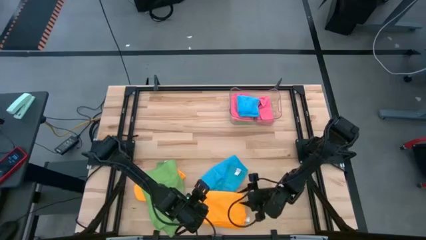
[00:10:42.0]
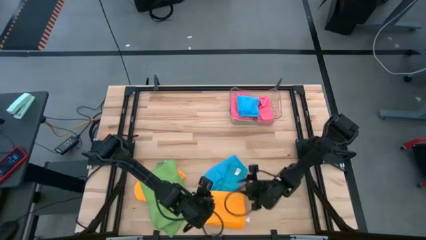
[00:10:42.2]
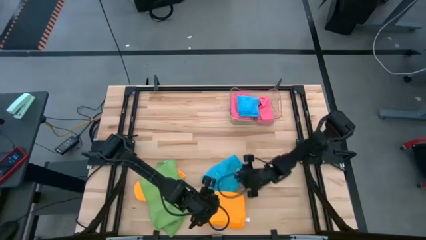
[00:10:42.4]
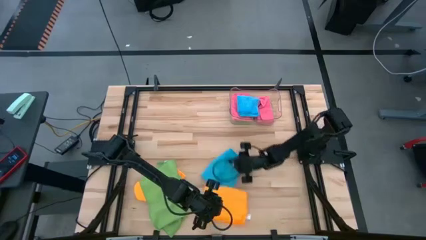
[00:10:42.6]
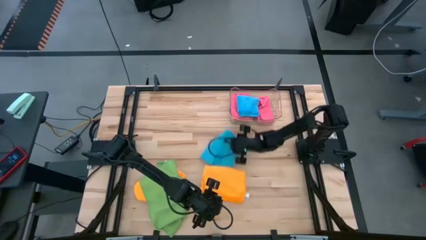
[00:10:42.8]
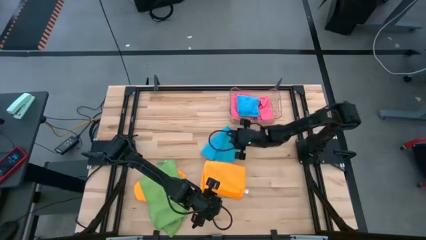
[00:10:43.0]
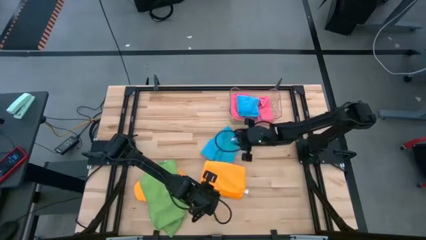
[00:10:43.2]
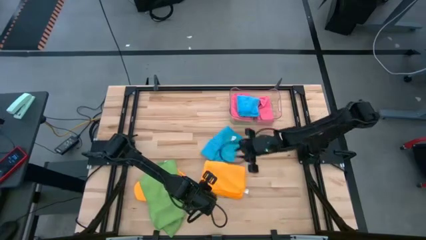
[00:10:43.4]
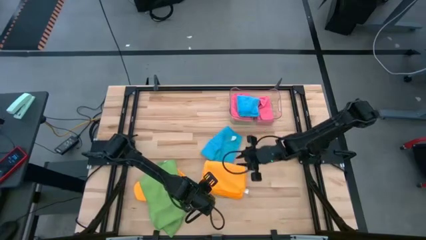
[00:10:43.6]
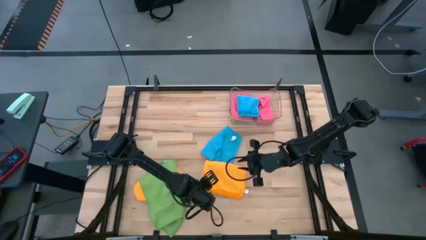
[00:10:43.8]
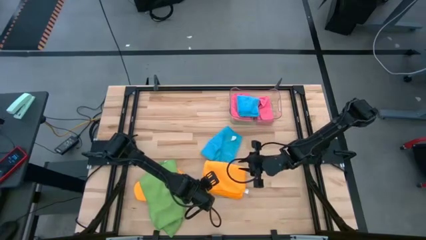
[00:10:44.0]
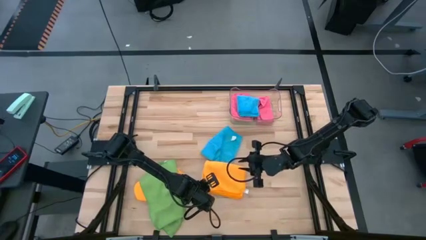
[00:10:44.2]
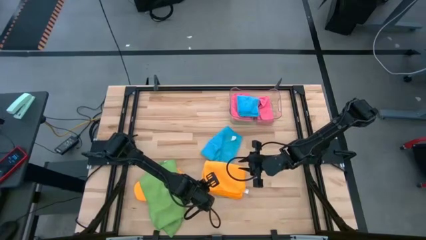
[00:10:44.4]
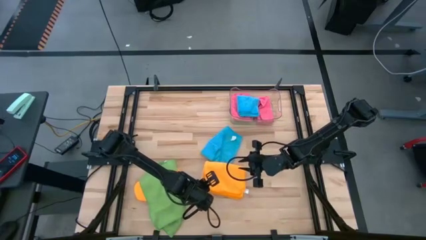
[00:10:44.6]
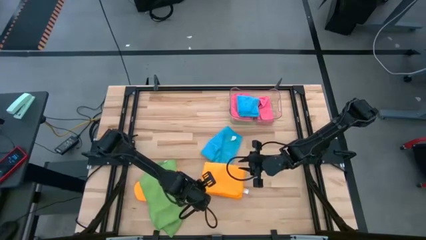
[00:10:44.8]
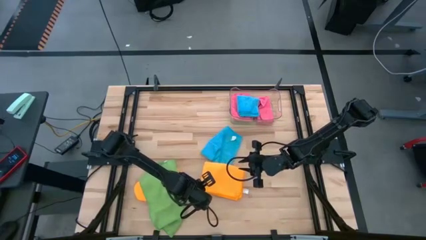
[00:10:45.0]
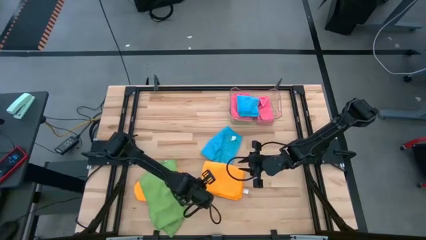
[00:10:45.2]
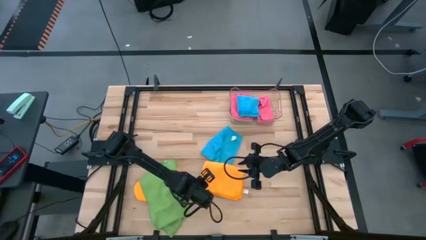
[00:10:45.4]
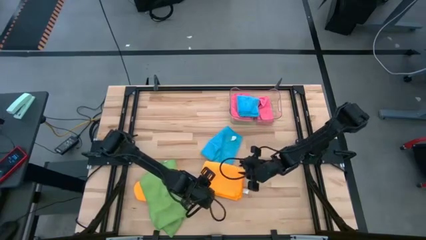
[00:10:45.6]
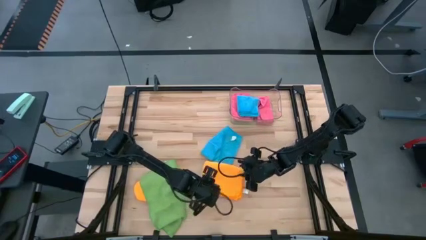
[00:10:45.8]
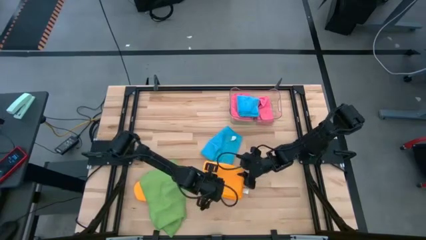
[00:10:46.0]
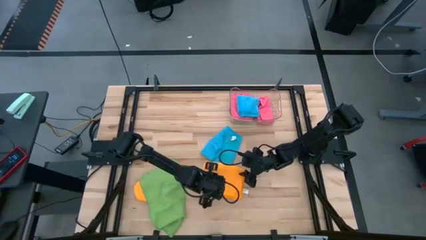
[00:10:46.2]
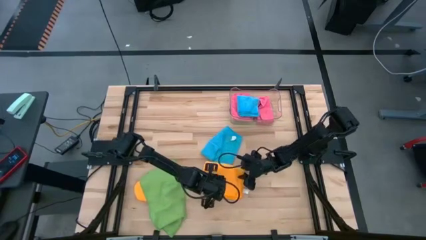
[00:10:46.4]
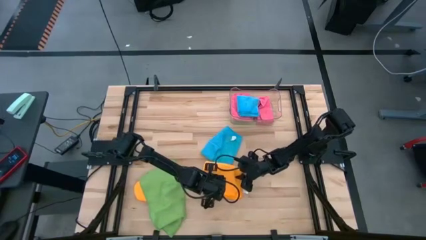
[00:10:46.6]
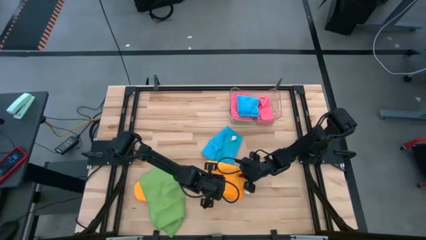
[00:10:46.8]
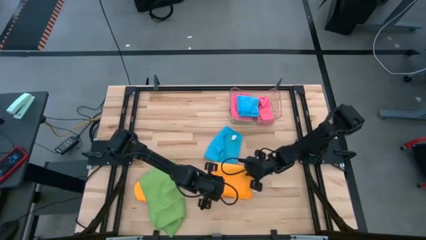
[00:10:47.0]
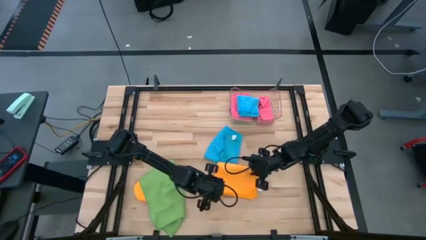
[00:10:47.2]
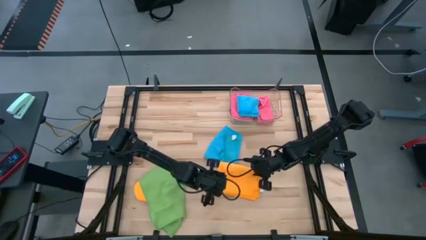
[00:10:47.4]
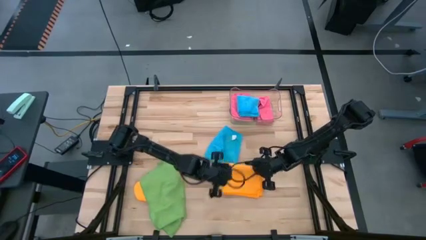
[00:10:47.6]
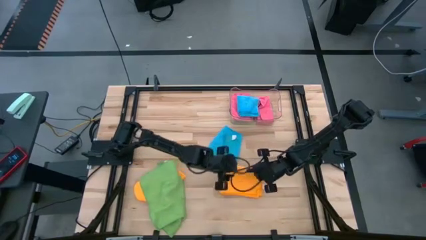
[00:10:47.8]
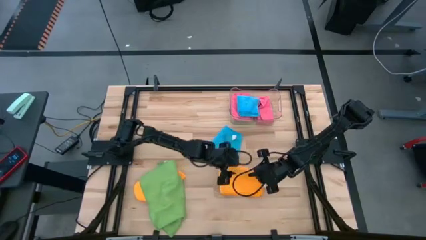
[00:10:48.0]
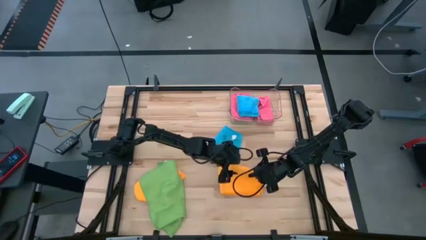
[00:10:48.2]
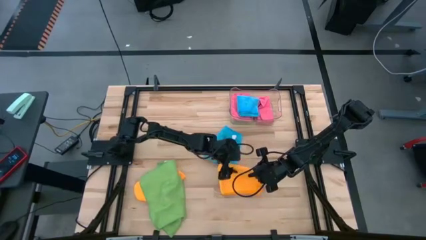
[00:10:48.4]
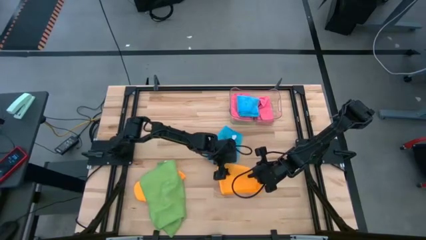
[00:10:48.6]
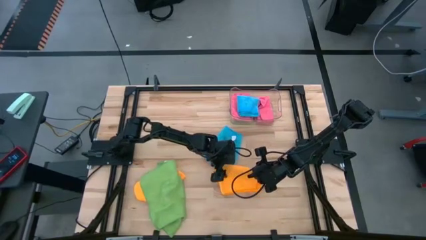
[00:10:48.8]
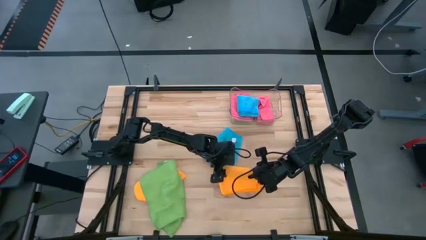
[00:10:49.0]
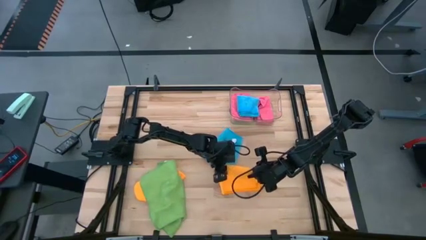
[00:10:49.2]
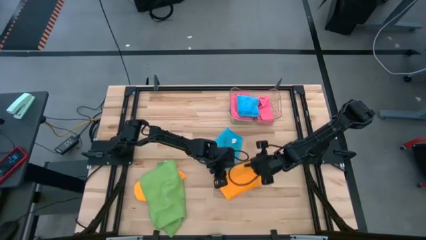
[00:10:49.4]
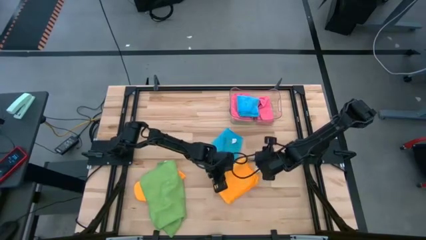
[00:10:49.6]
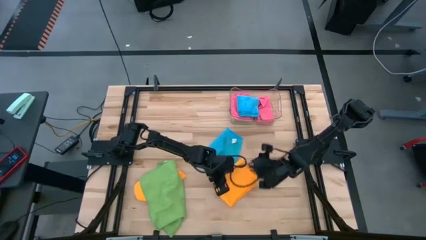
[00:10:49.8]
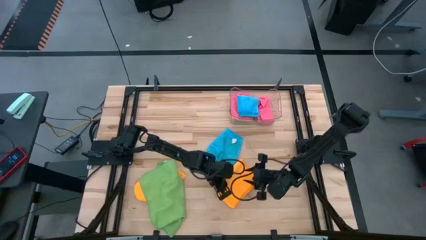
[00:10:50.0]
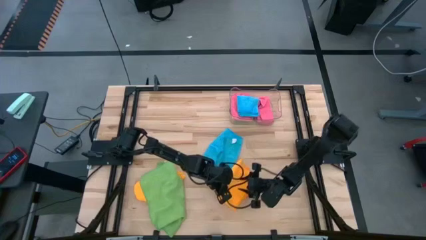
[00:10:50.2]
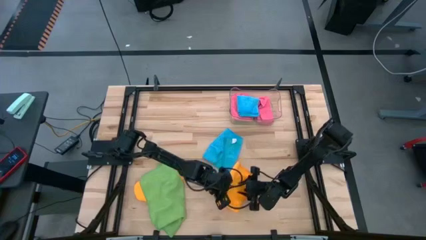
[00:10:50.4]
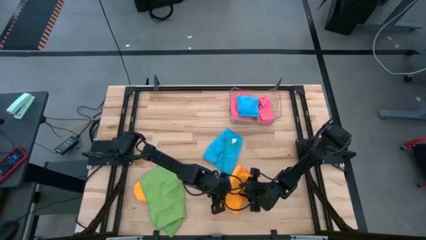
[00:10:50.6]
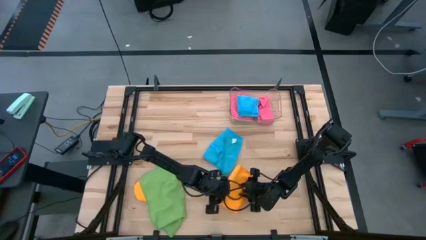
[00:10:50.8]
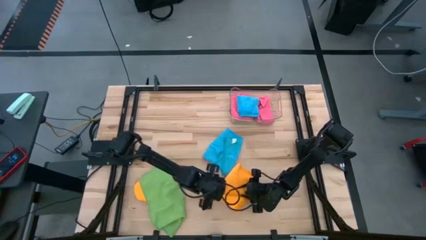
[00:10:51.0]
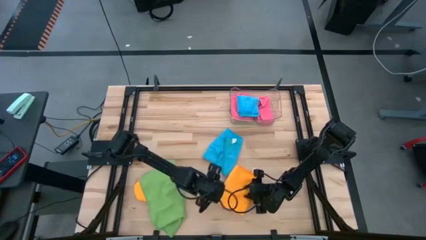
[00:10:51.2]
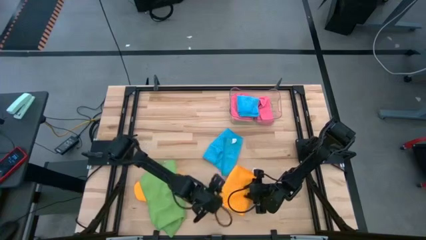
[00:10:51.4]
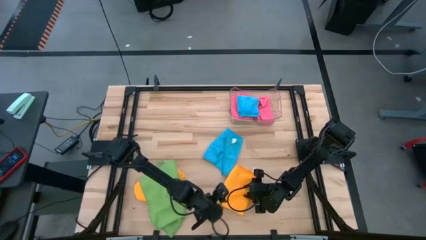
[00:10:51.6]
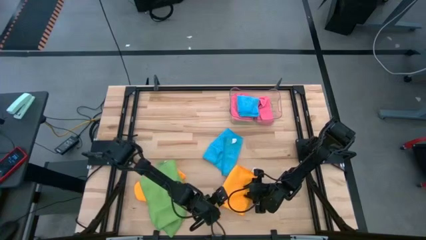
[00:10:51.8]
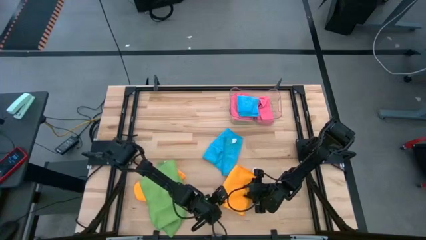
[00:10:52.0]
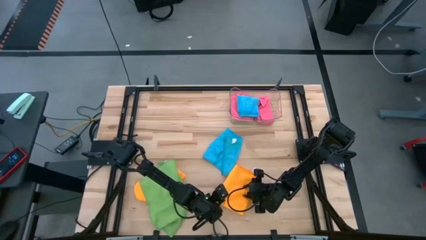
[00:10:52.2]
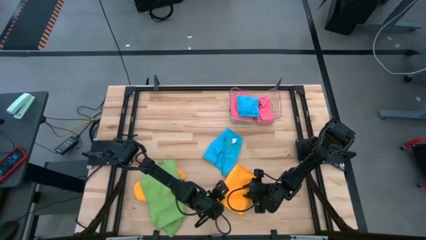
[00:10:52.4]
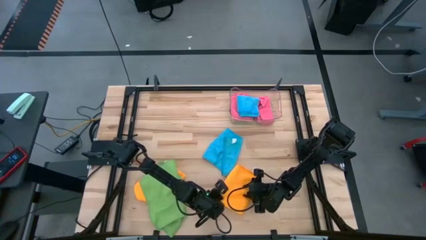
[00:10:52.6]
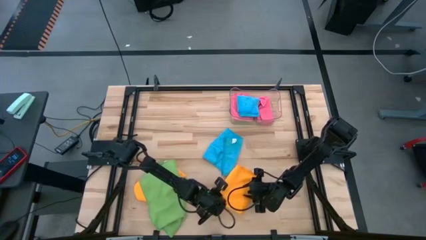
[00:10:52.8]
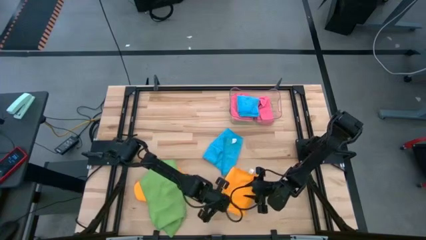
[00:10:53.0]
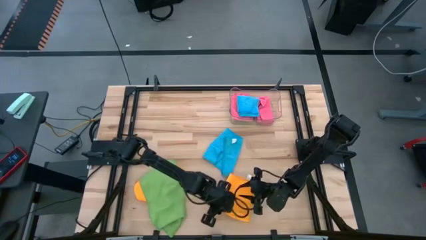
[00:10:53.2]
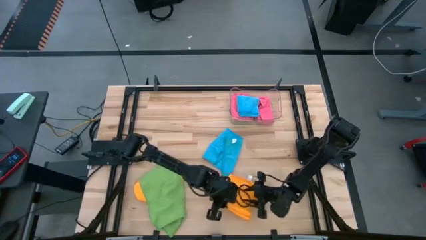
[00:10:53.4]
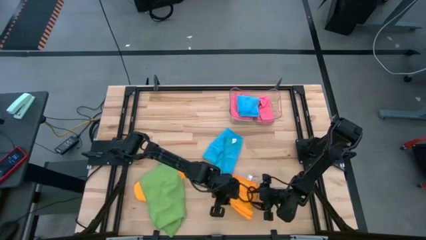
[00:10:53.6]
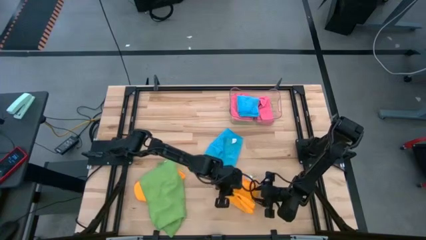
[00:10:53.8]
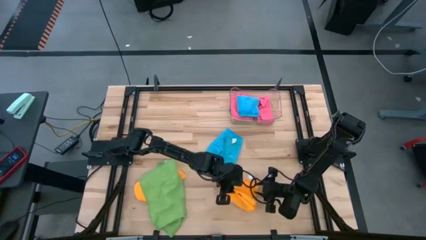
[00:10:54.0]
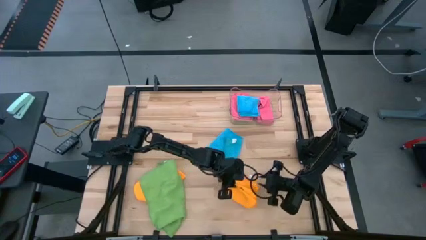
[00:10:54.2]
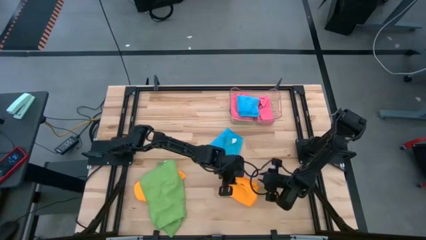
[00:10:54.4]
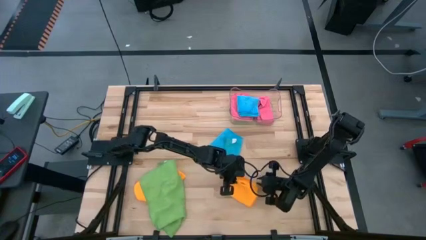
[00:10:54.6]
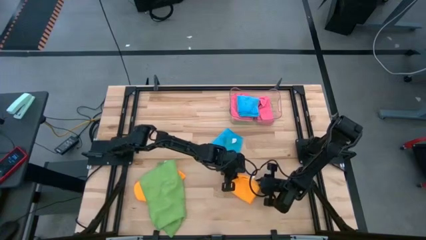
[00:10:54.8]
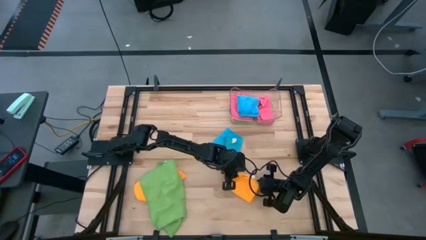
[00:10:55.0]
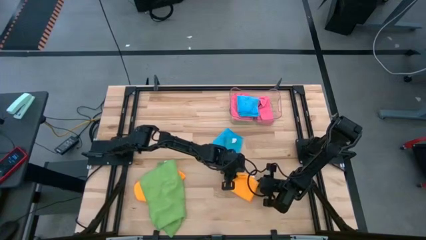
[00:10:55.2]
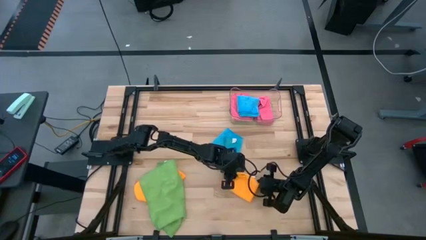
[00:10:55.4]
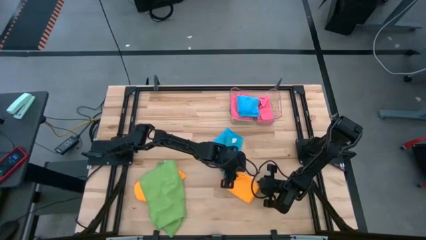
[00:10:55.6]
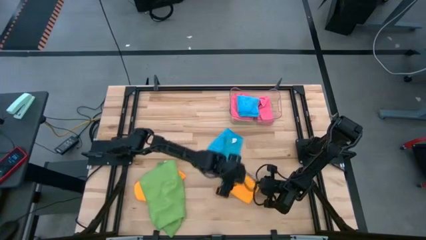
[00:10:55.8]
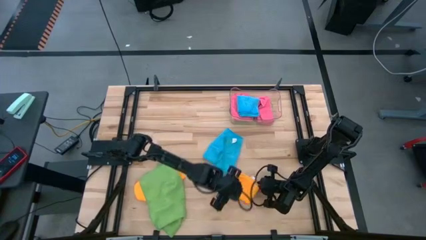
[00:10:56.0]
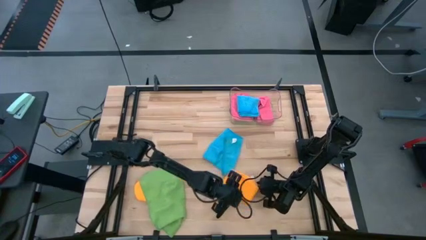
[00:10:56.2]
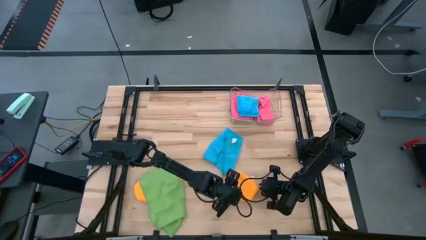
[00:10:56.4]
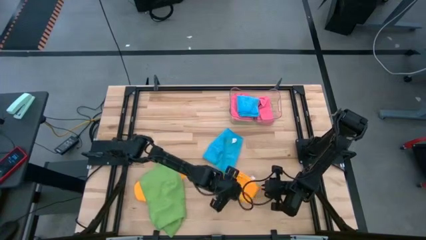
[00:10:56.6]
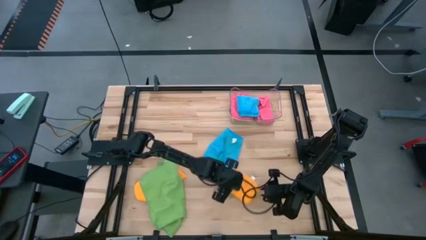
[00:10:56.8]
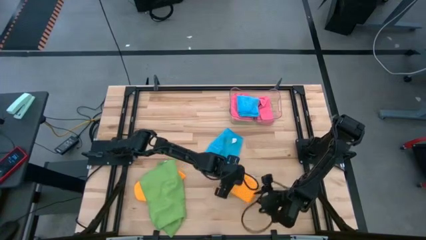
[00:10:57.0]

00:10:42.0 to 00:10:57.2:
Task: Fold microfiber towels
Fold the right yellow towel
